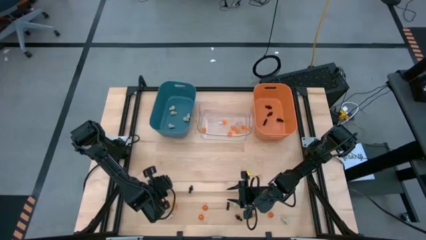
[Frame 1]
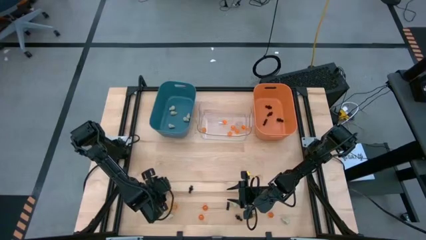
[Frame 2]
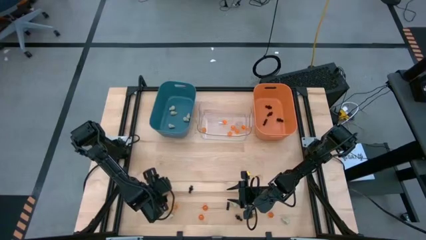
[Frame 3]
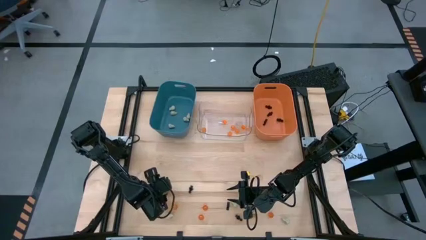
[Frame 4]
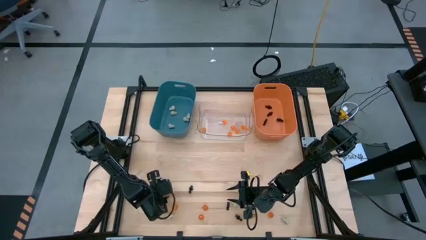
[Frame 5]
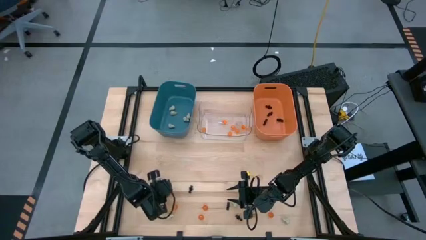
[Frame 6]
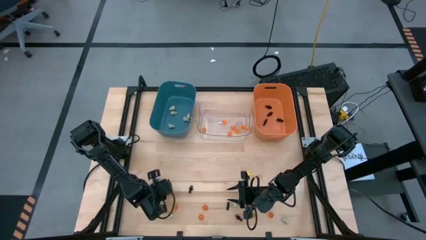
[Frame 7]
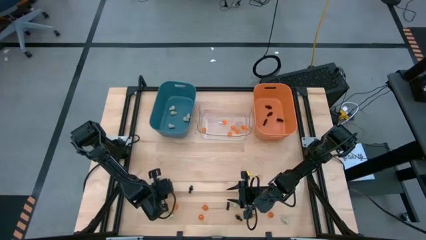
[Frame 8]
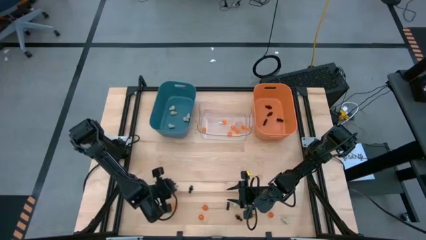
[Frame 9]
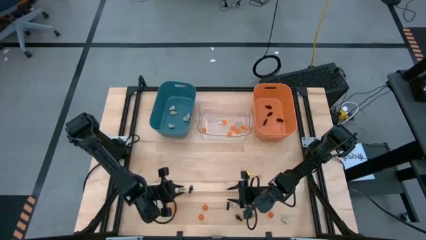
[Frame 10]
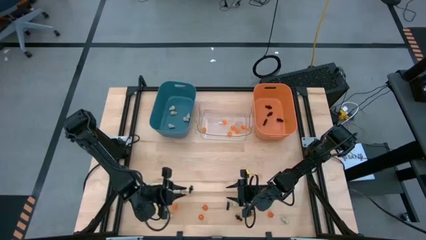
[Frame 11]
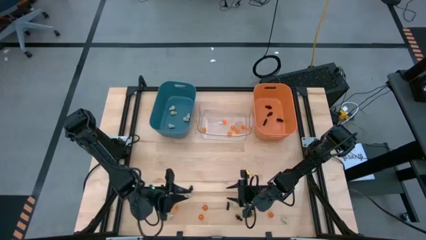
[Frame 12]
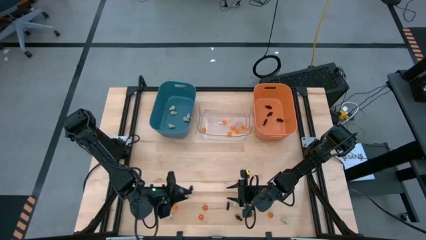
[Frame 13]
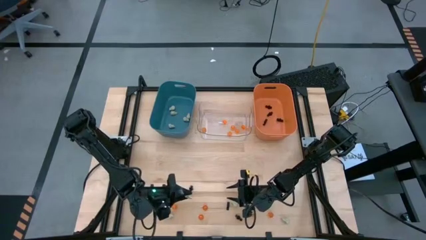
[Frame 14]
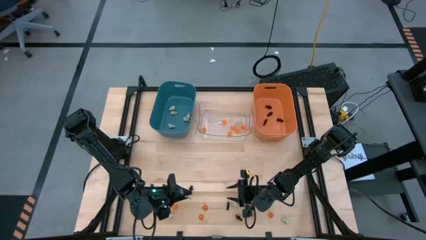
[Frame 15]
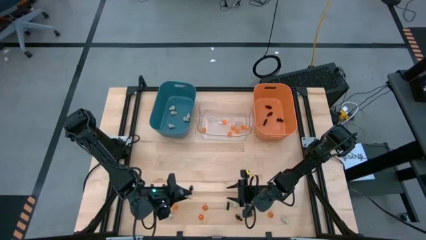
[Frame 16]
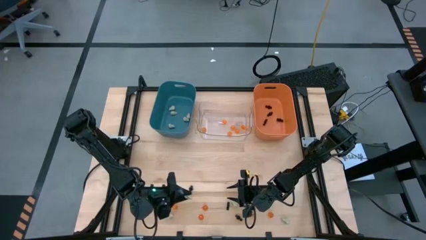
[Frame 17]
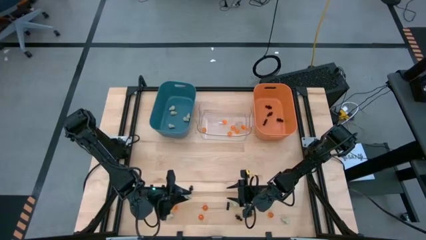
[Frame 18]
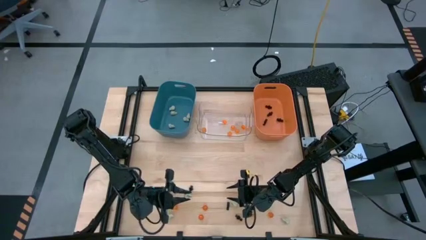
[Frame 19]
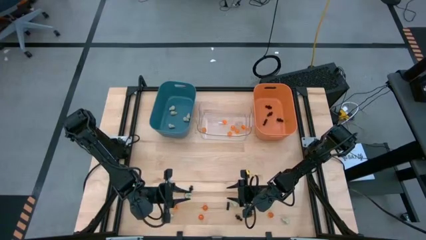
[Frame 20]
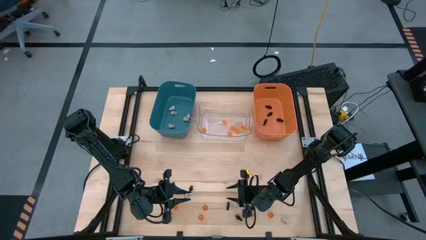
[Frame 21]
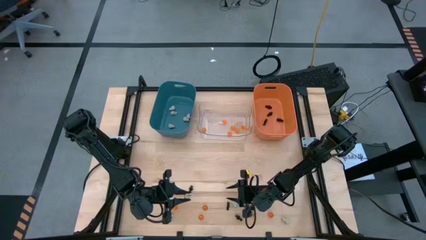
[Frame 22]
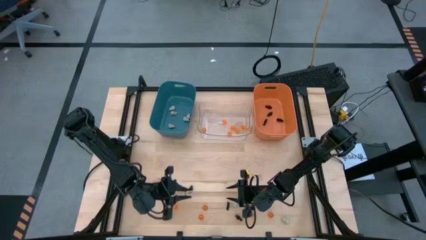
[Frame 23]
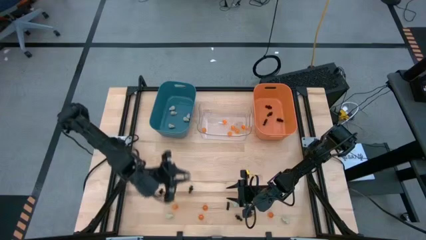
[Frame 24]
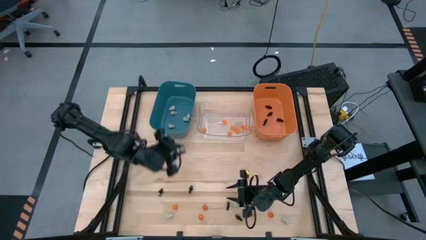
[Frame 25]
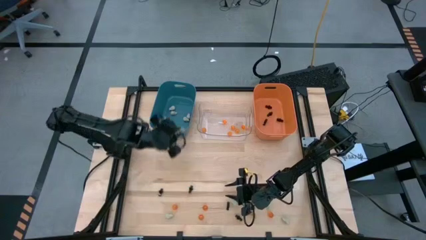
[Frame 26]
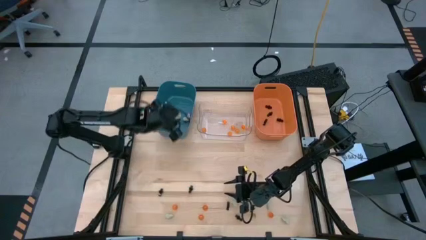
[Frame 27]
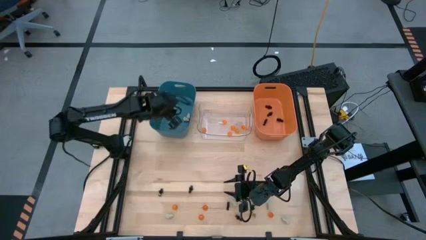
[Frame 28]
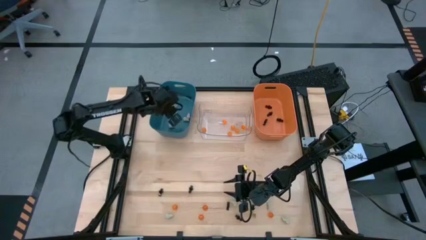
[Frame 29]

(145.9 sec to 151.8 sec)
Task: Sort Halloween decoration
Put the white skull toy into the blue bin

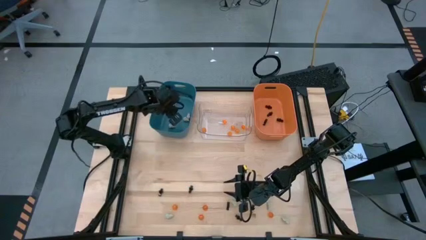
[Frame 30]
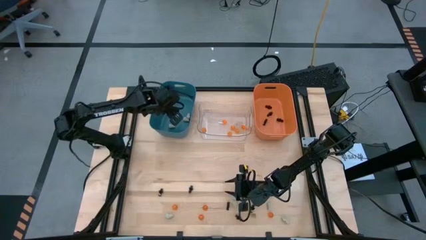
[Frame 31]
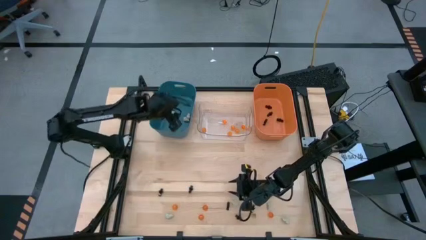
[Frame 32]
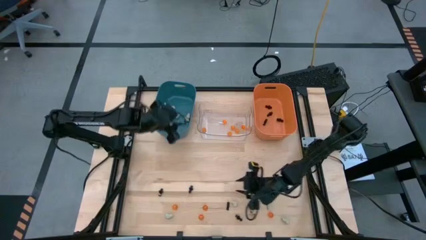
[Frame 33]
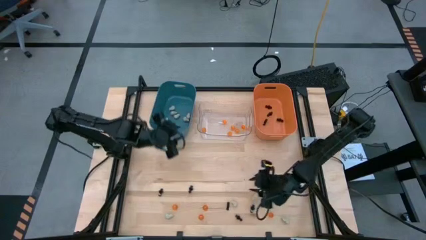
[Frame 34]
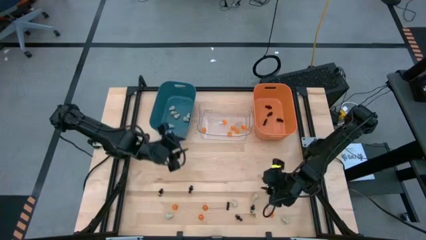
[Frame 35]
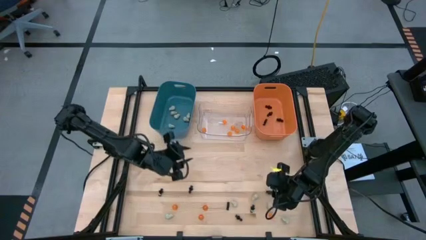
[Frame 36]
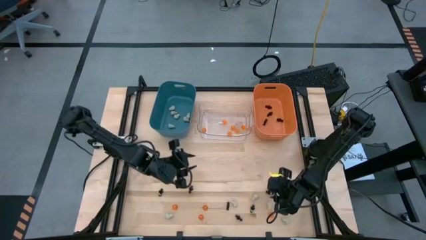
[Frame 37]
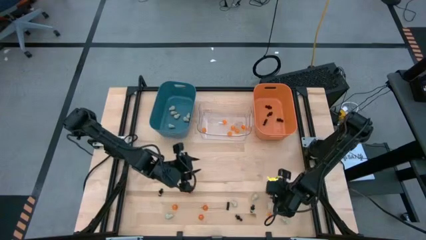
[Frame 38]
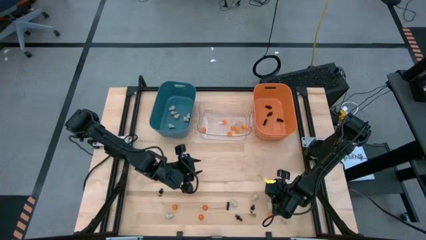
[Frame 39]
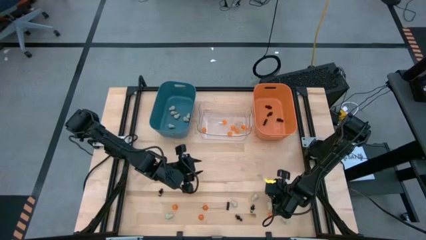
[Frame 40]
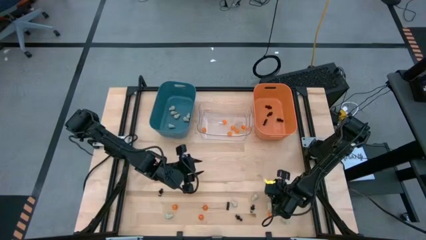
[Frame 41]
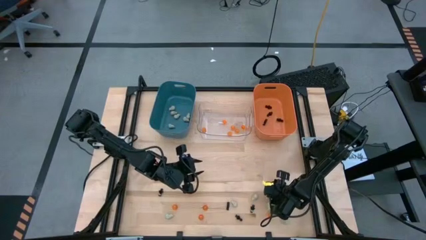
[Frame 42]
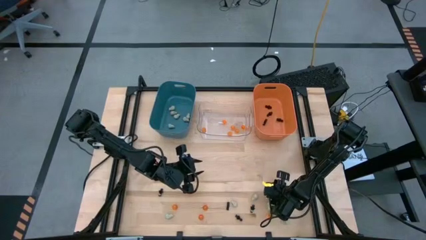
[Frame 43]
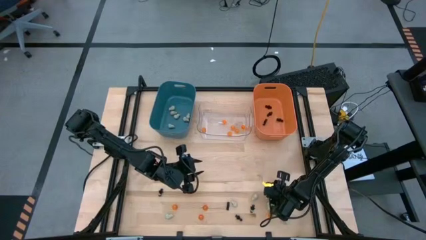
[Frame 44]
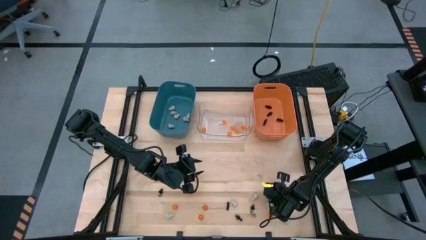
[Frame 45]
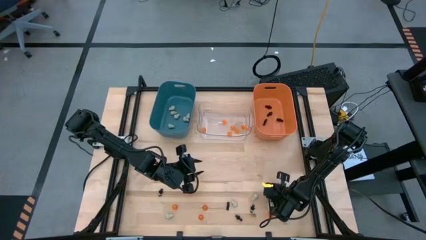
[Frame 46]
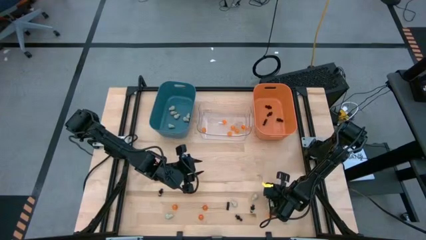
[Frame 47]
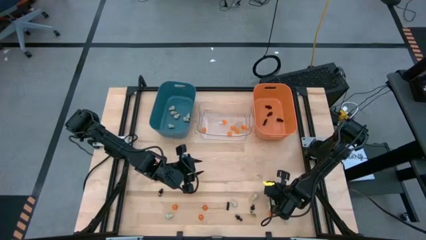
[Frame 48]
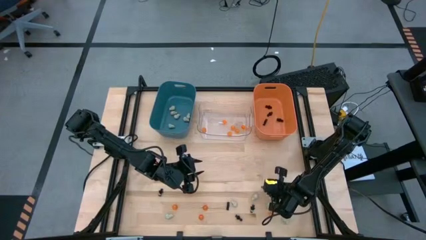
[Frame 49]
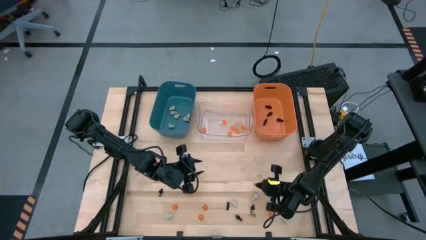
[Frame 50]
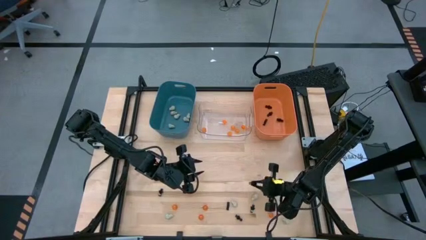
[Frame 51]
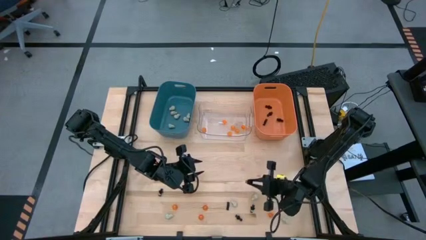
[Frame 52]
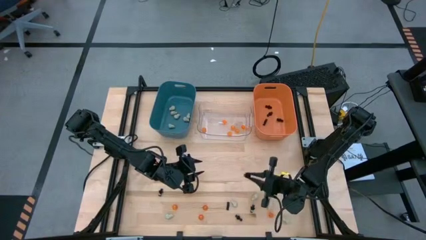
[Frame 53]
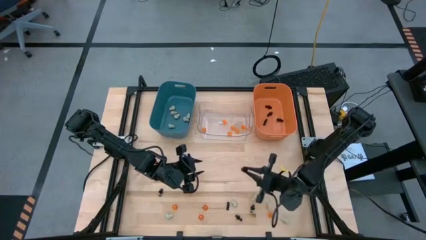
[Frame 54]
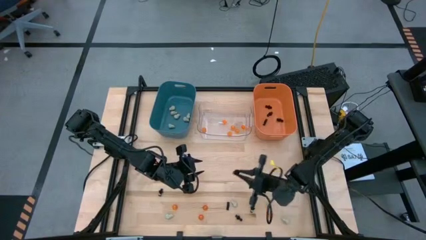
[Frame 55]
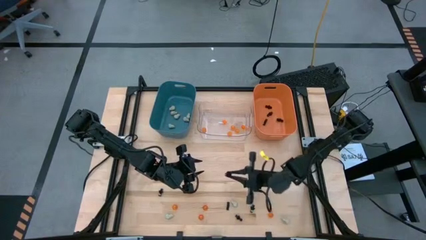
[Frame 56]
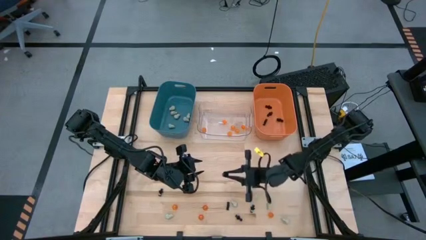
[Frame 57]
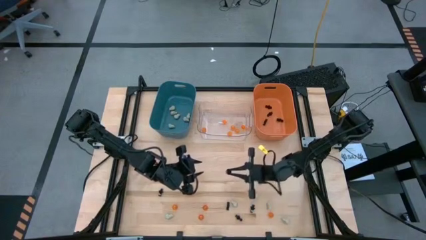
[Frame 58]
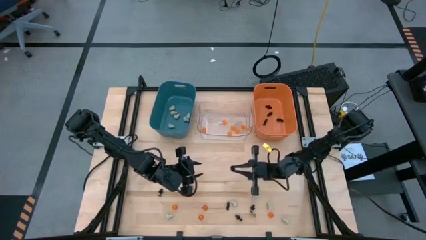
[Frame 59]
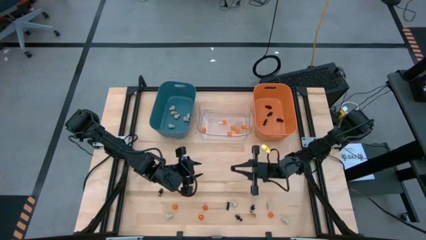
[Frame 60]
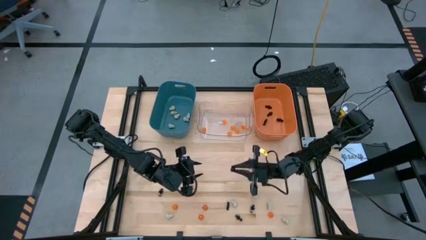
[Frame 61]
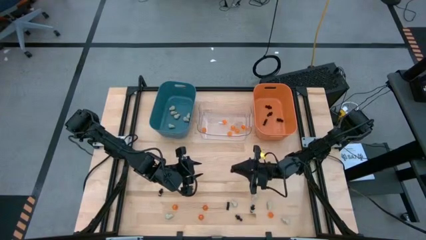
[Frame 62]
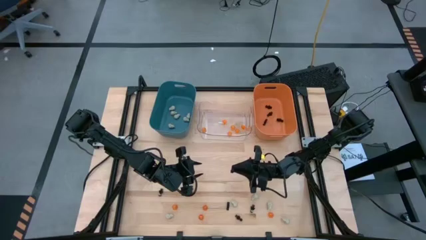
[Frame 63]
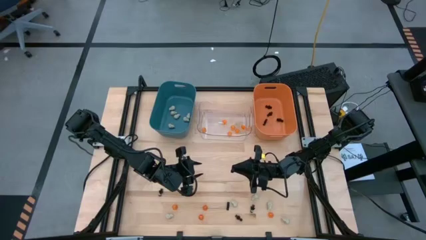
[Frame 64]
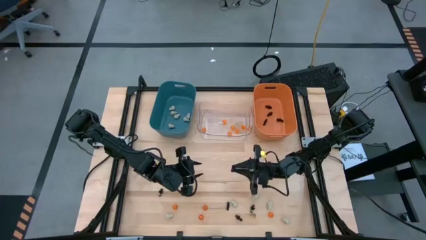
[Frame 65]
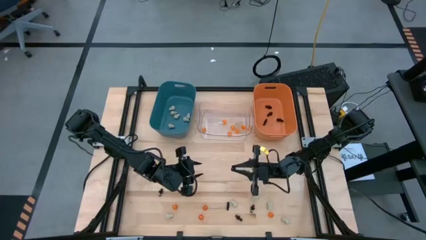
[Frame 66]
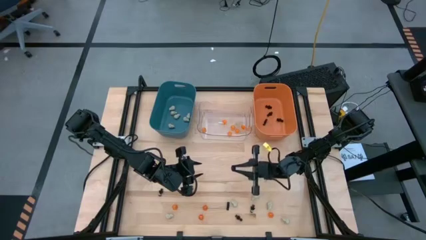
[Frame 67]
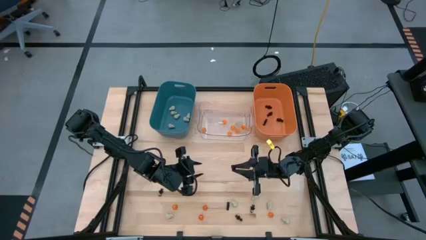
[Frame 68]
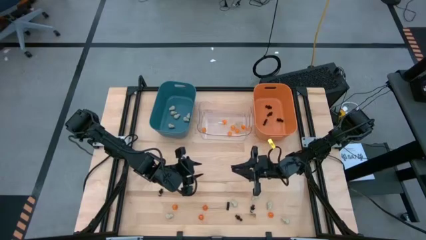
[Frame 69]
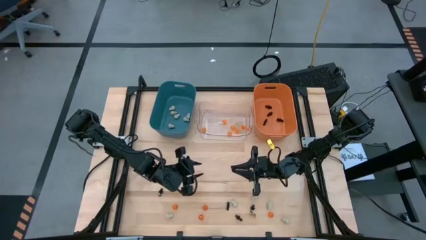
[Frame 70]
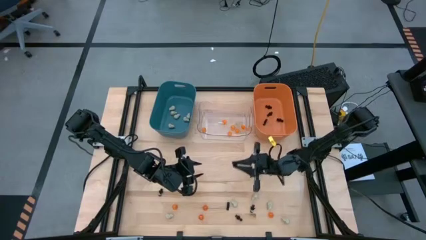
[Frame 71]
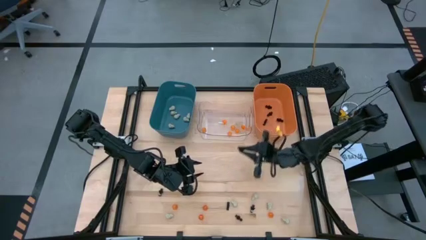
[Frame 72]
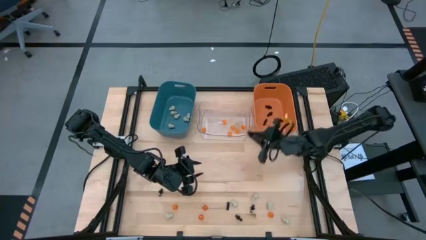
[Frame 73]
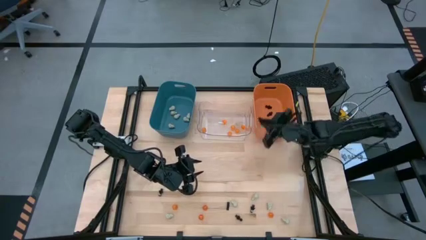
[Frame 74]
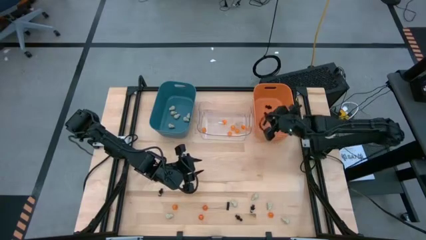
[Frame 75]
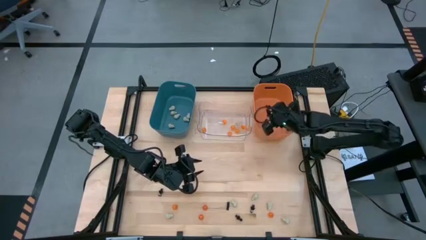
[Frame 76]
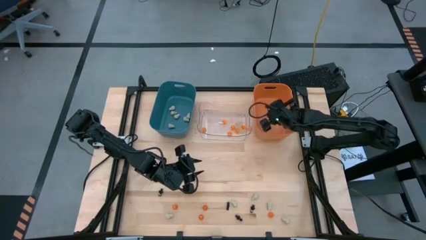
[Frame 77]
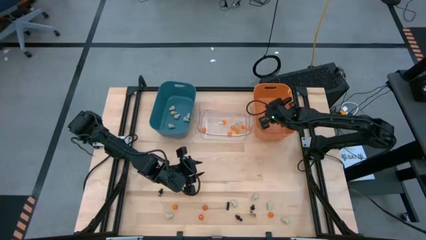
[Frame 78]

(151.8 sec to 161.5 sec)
Put the black skeleton toy into the orange bin

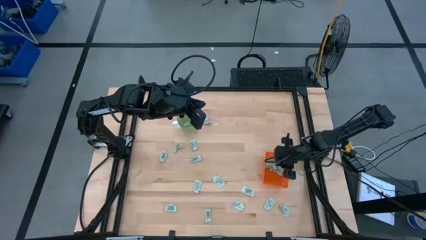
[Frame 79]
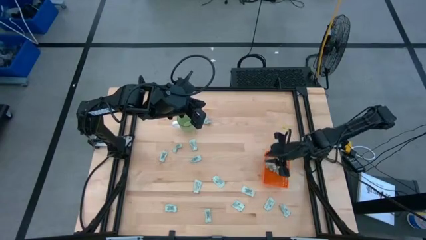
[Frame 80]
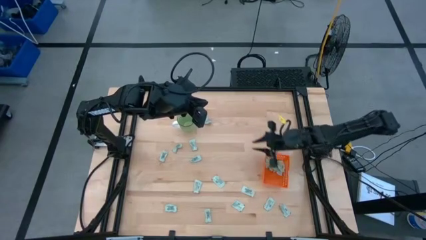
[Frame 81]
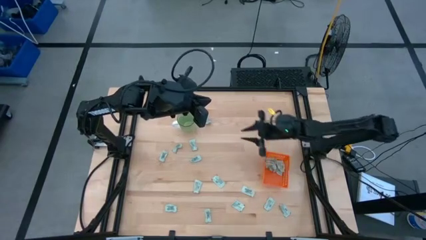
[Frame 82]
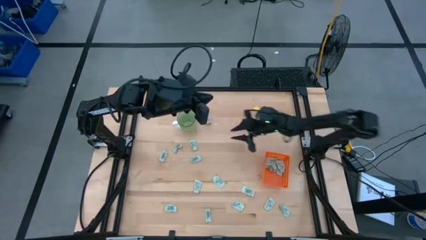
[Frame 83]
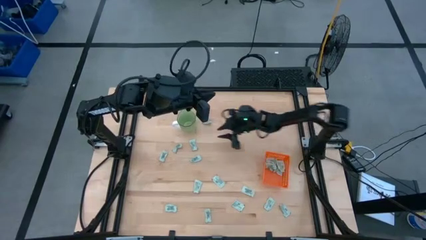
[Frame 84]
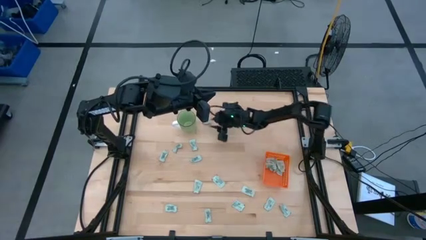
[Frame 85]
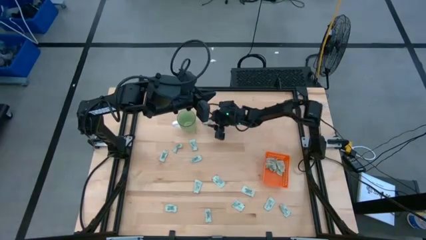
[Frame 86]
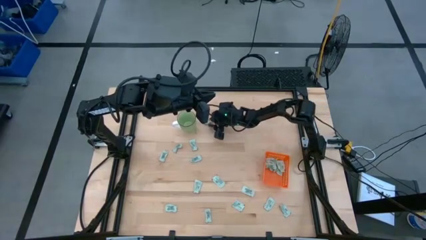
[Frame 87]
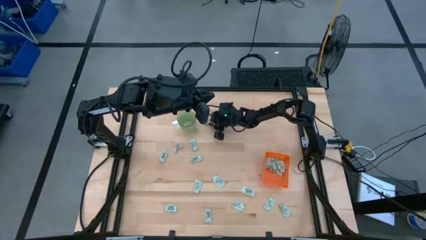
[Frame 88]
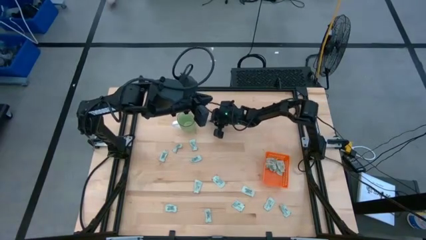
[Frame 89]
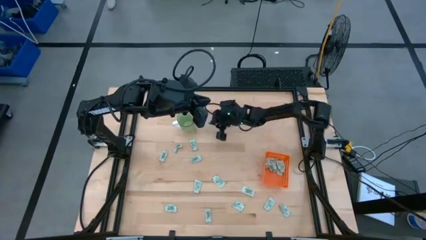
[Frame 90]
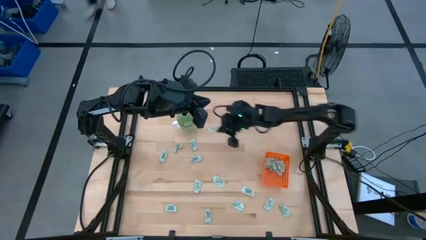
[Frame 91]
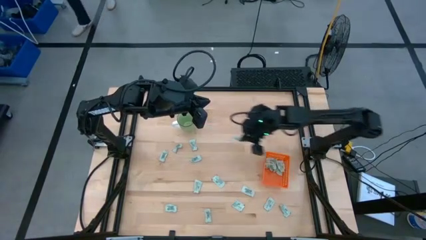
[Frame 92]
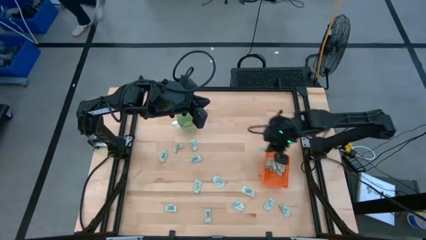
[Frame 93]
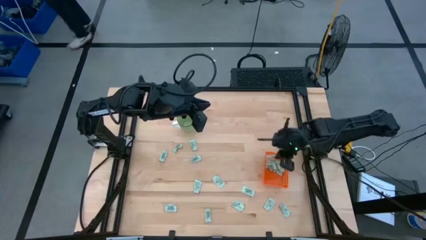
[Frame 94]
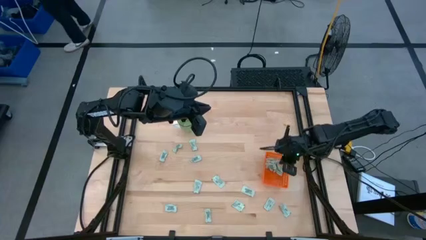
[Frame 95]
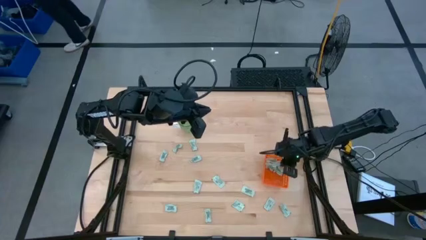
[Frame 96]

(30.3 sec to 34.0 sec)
Task: Pick and place Stevia / Truvia into bins
Put the stevia packet into the orange basket
